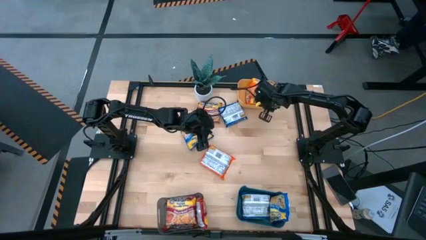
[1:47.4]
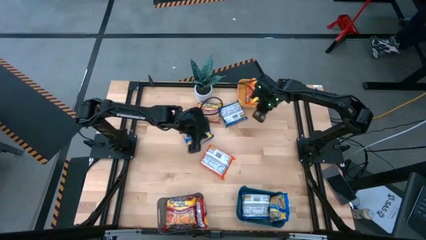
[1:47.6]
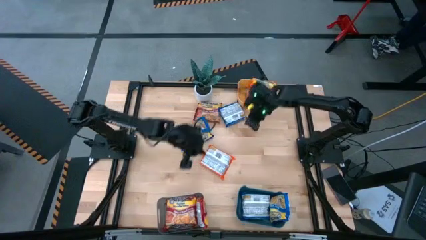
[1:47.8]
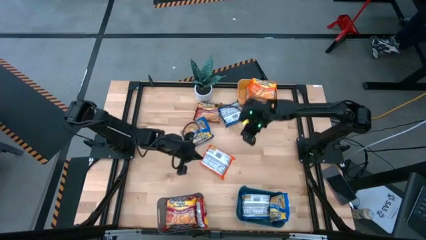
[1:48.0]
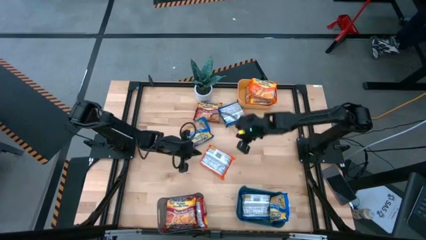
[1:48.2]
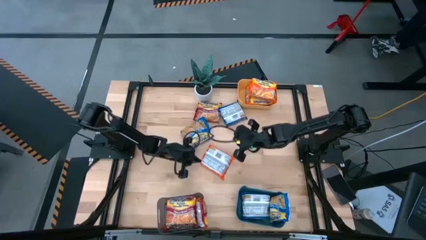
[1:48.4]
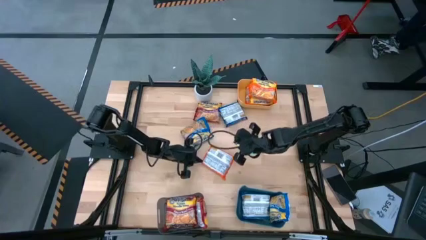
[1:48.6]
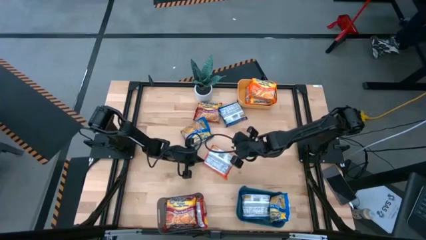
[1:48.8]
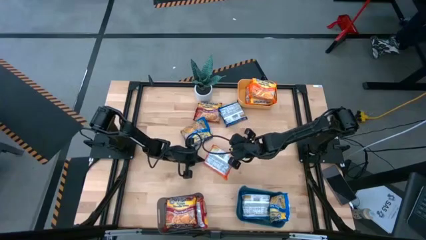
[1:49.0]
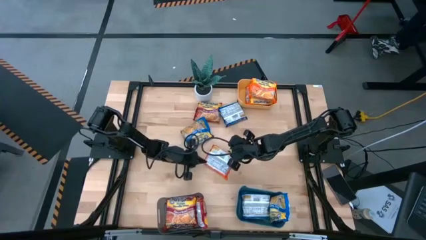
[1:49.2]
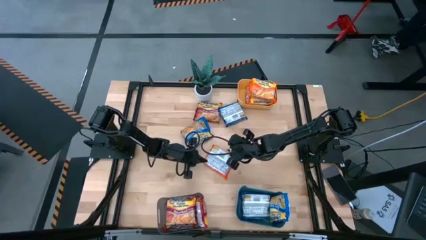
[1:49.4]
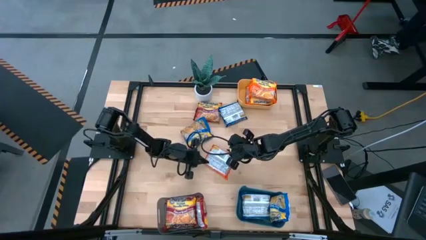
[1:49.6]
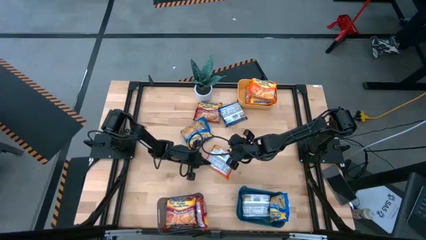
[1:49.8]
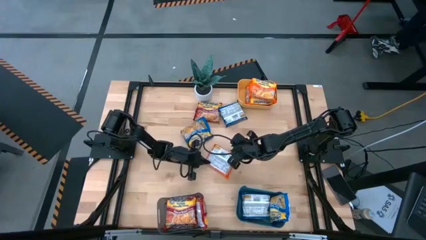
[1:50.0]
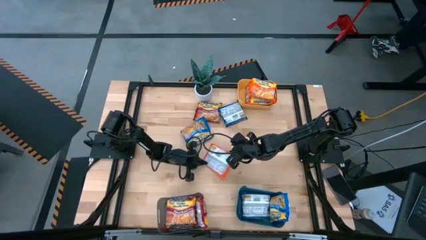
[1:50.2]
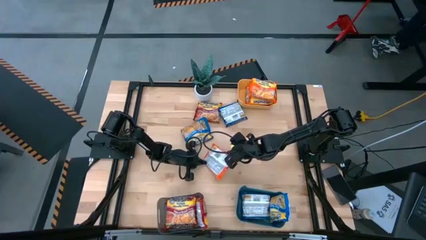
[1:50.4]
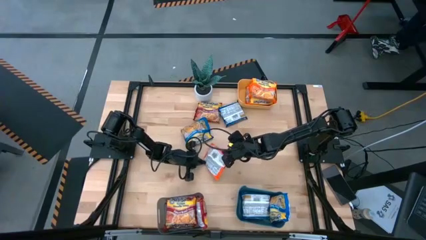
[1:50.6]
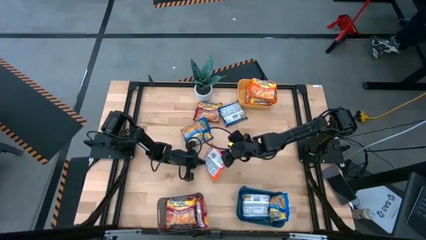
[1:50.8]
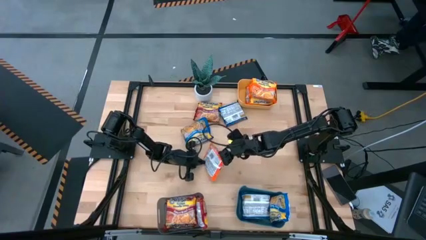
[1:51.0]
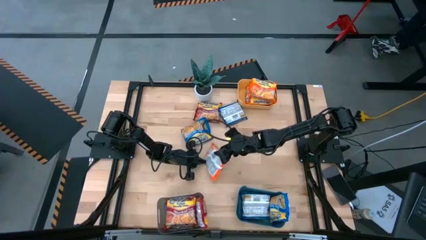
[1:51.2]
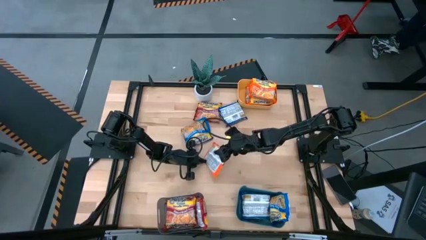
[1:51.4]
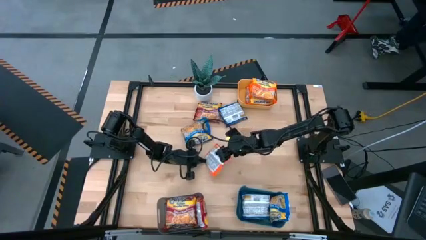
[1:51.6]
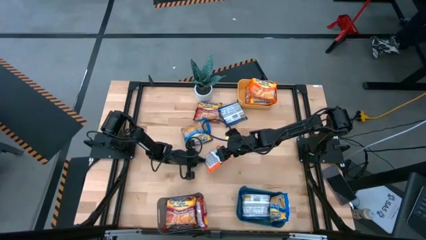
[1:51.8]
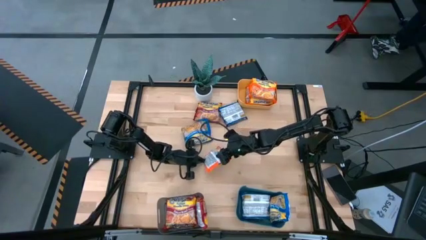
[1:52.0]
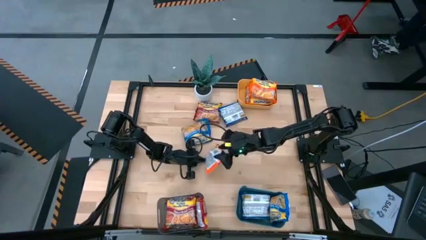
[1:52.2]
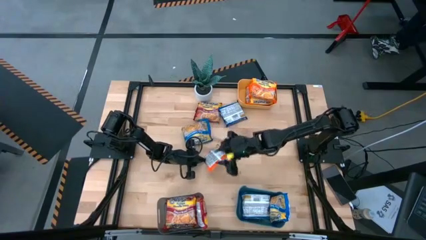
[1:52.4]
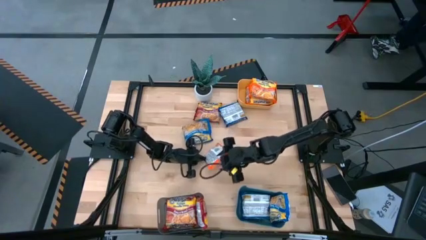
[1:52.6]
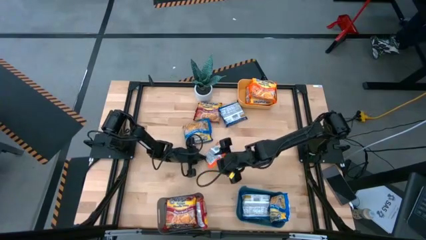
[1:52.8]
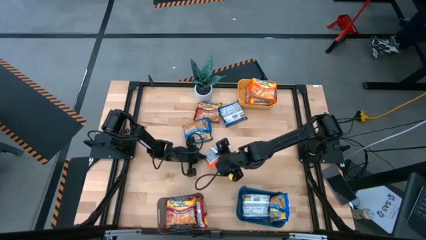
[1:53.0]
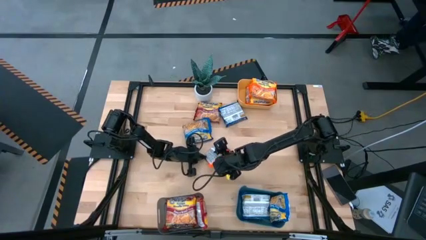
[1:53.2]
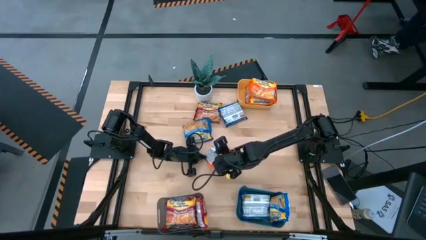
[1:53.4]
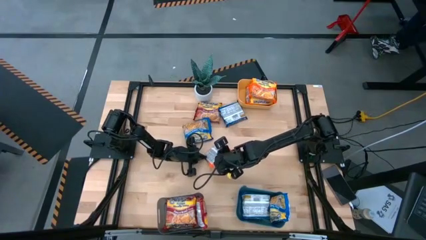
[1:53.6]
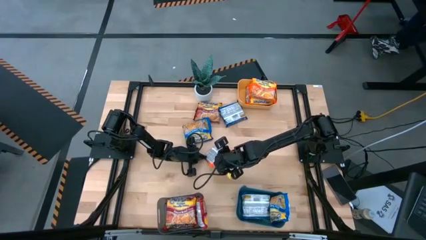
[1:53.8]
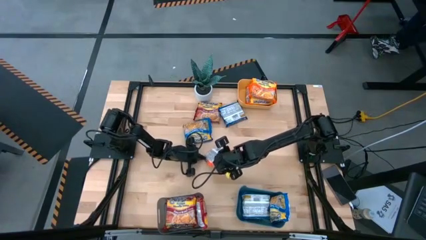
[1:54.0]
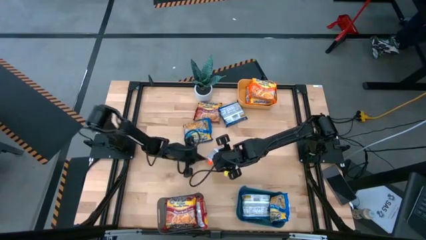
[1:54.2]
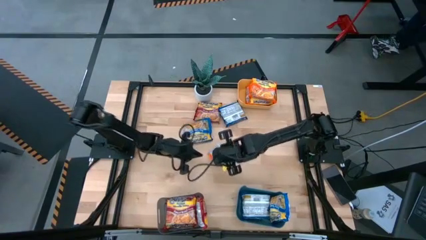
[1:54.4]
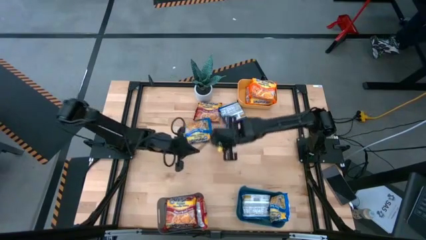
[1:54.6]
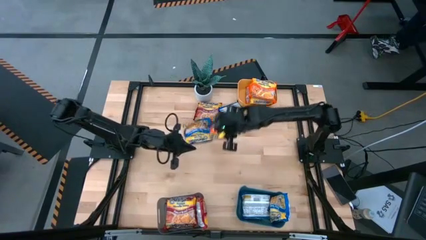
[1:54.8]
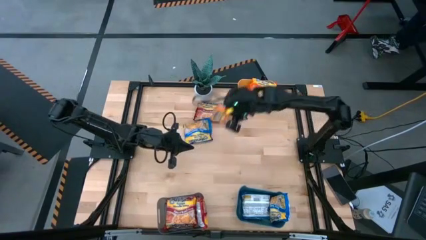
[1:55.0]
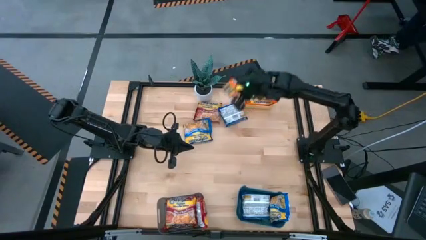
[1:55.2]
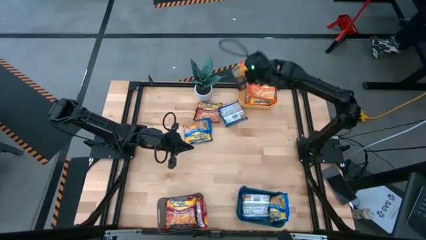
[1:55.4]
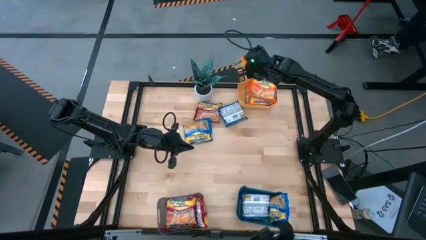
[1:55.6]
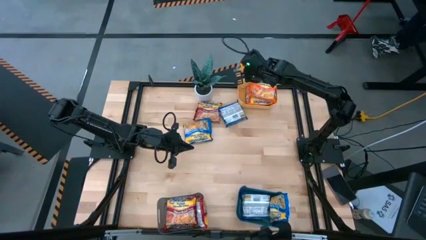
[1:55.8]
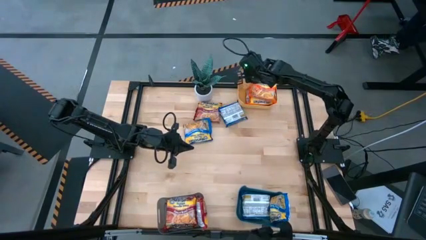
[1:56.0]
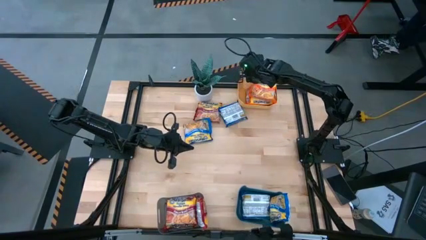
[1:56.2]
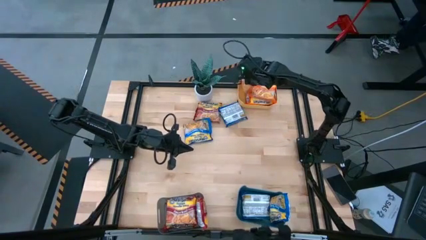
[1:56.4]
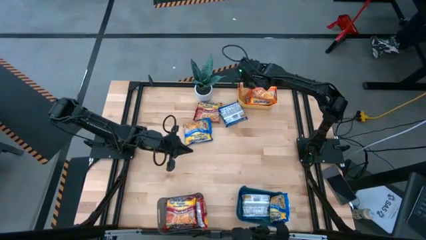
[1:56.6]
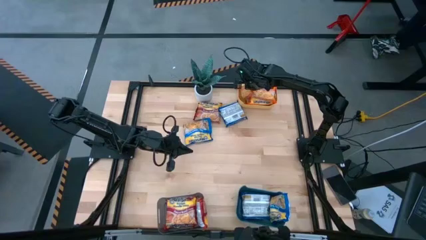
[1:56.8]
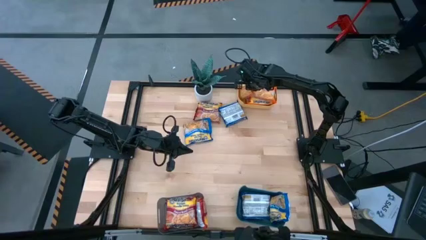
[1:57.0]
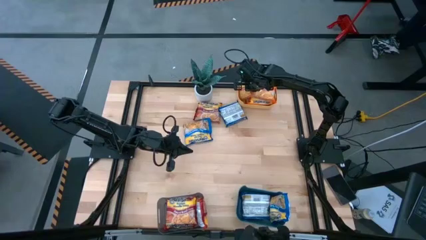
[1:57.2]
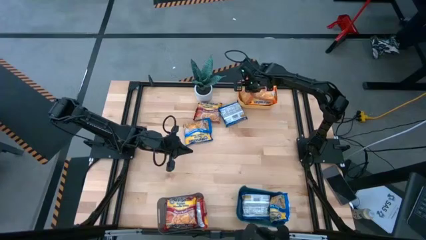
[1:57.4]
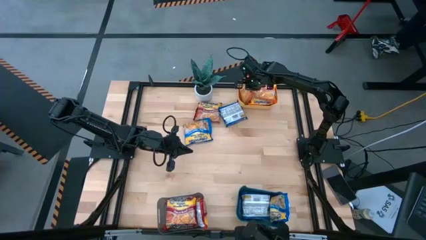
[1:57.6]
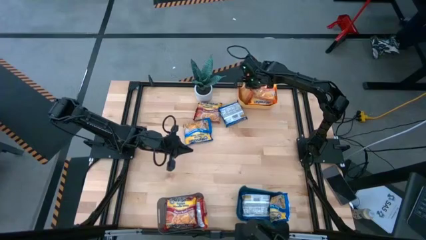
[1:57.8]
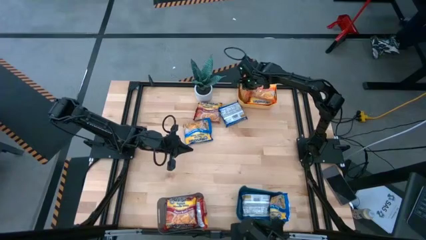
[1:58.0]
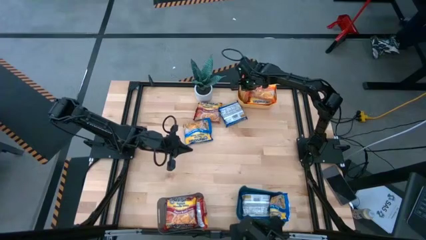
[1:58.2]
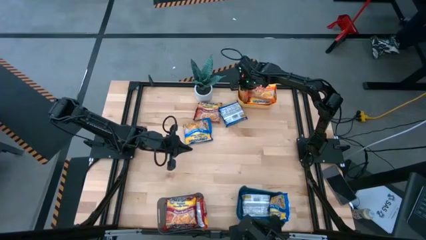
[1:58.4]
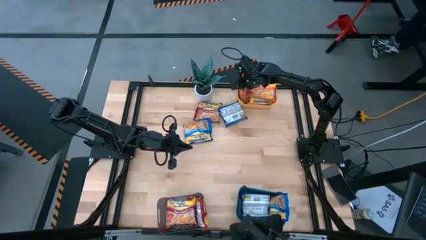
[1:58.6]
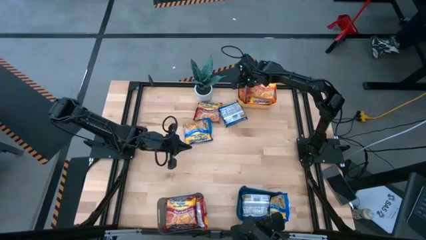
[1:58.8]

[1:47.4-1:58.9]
Task: Sort Maruchan noodles
Put the orange noodle pack into the yellow bin
